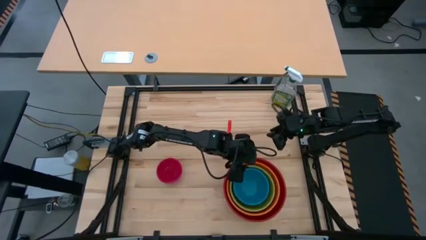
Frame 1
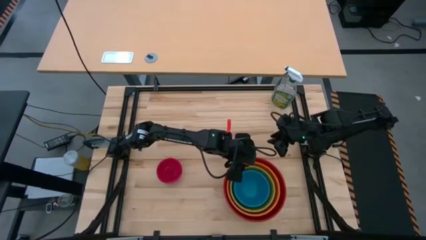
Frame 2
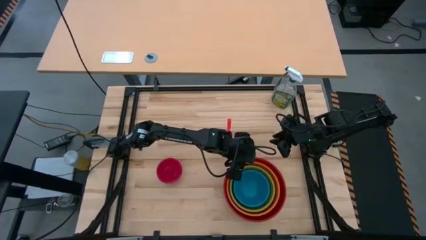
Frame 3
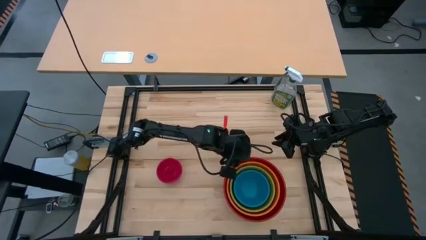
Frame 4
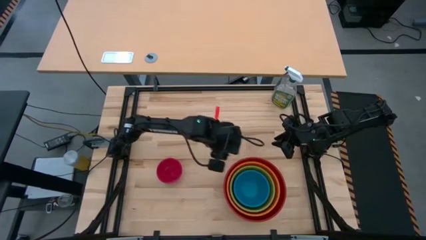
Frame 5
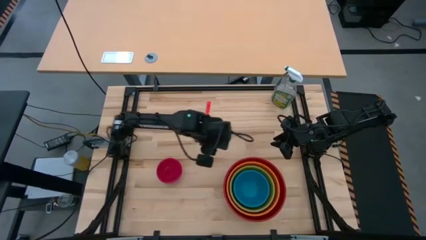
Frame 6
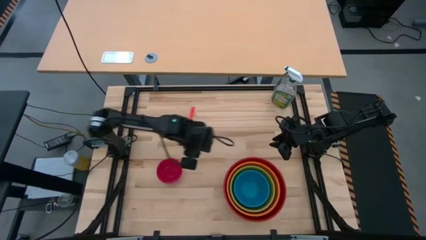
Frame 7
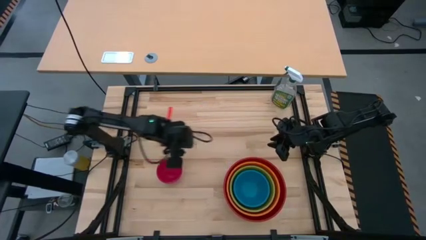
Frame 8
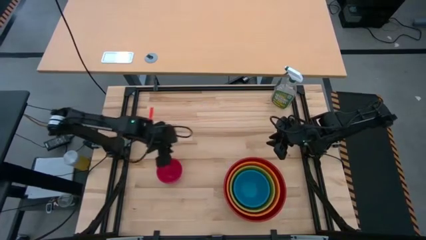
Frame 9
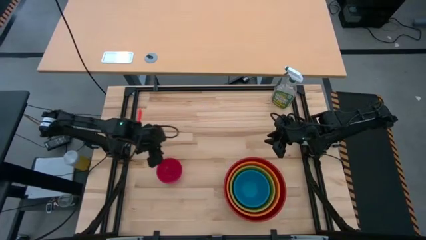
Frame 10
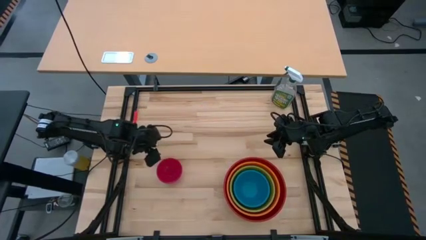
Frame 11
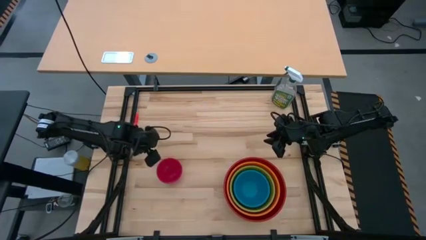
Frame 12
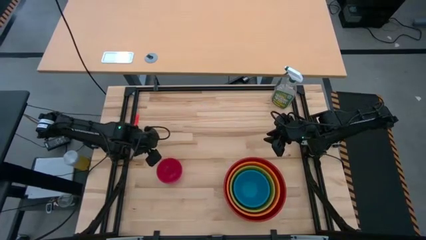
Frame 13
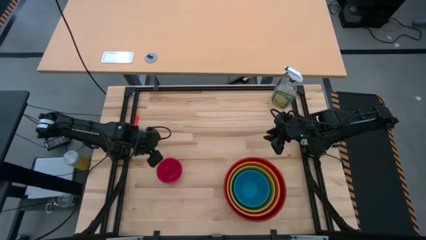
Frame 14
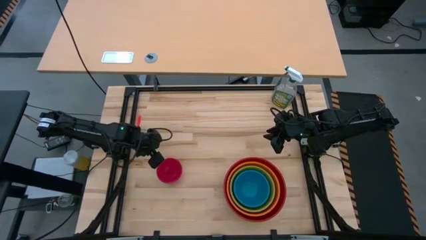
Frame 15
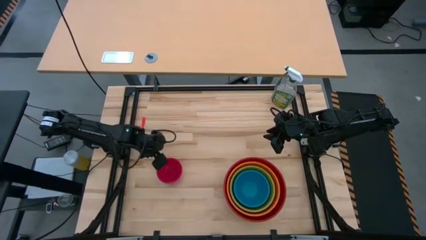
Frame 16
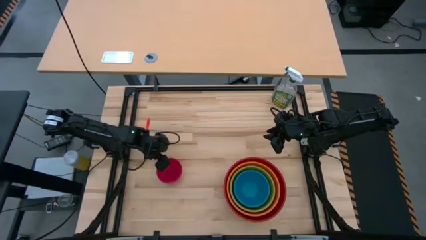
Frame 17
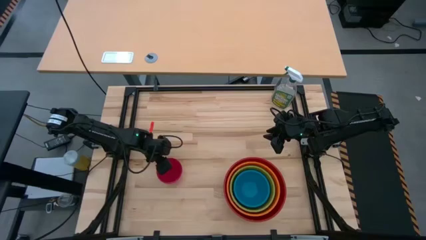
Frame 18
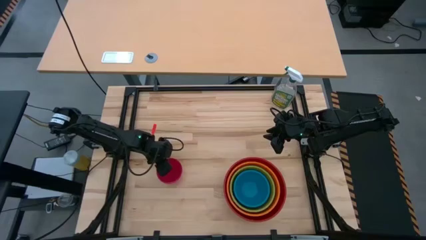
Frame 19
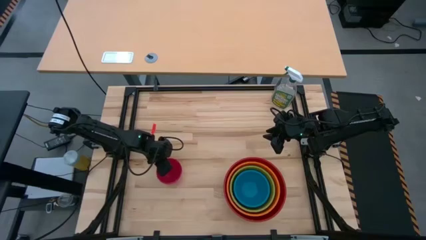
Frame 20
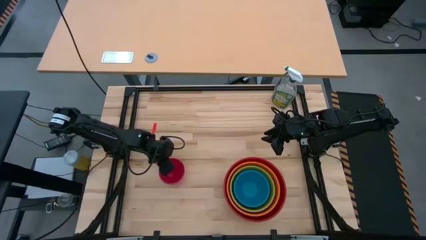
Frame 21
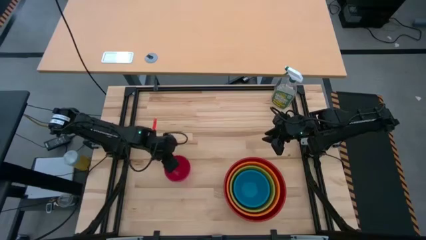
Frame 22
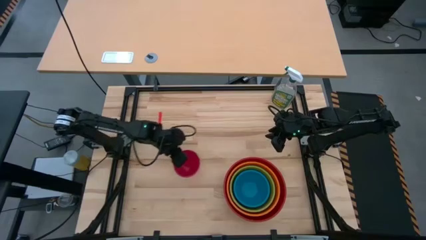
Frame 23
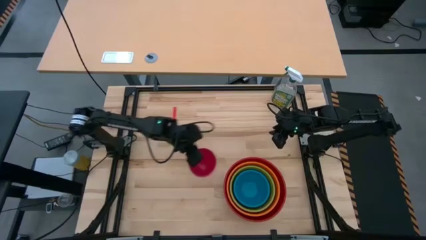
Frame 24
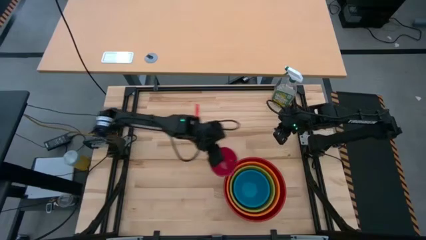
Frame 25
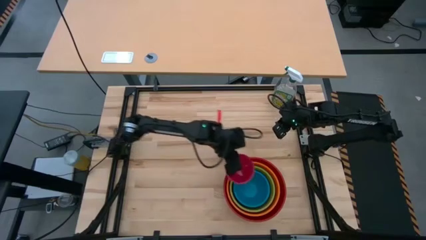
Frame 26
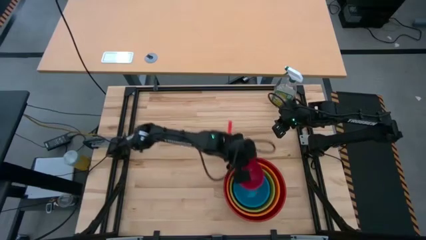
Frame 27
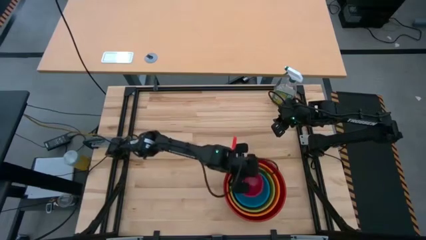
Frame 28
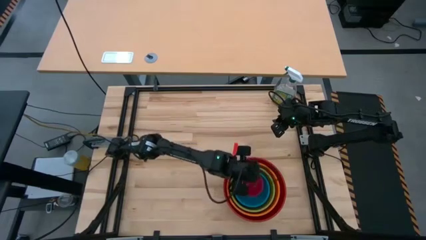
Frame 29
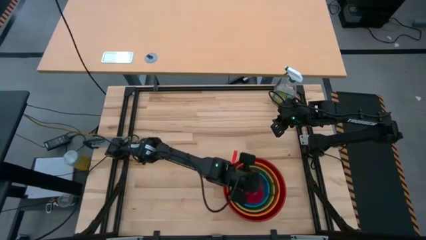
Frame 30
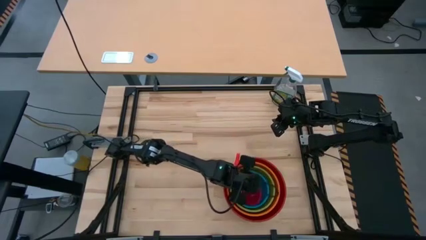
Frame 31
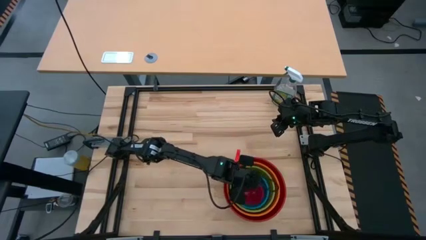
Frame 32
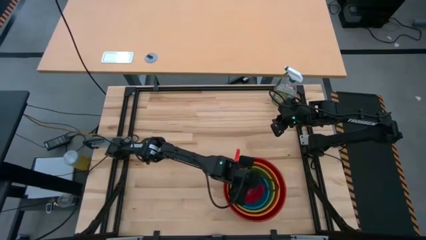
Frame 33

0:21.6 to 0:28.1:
Stack the red bowl on the blue bowl

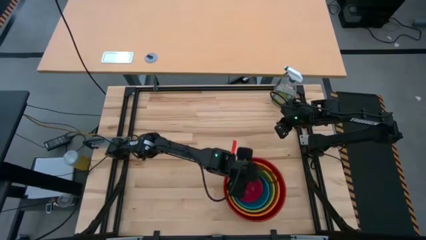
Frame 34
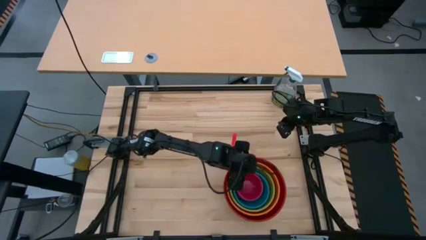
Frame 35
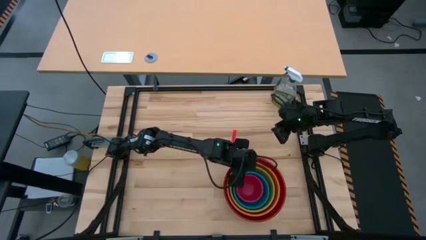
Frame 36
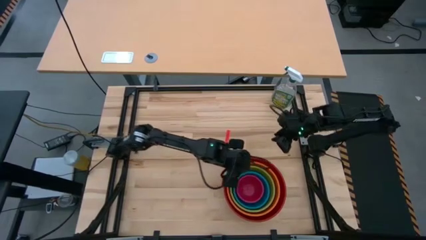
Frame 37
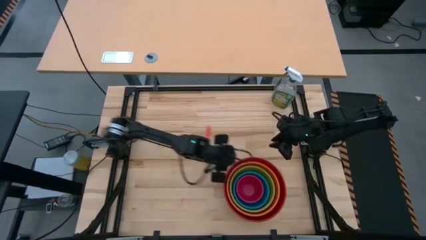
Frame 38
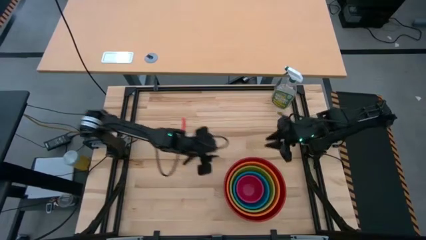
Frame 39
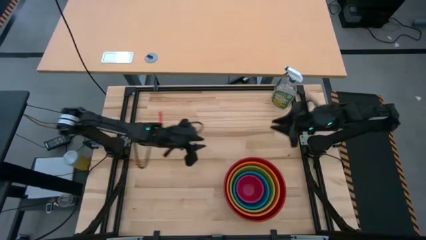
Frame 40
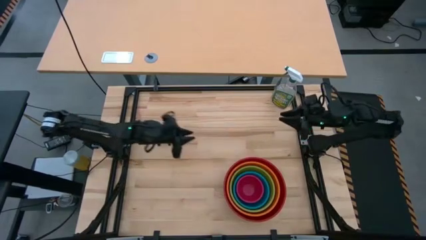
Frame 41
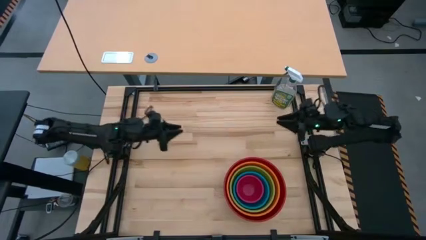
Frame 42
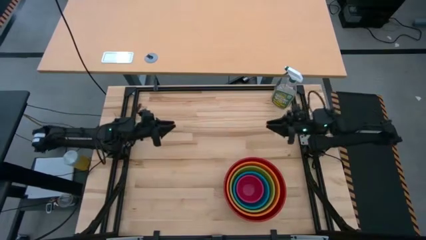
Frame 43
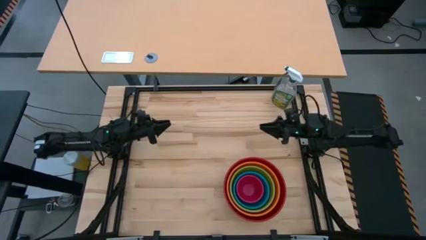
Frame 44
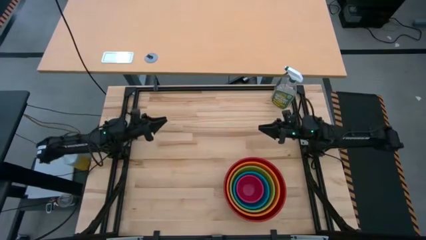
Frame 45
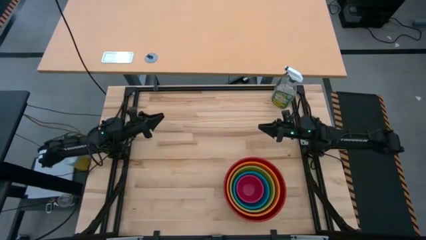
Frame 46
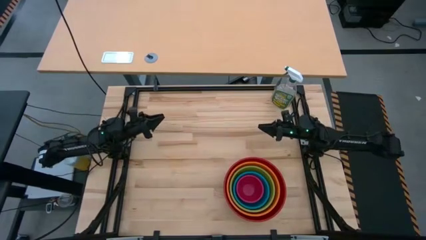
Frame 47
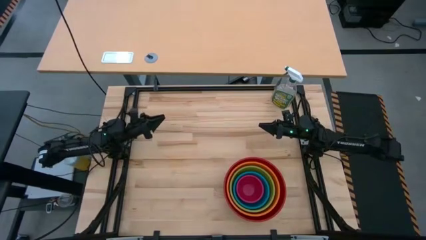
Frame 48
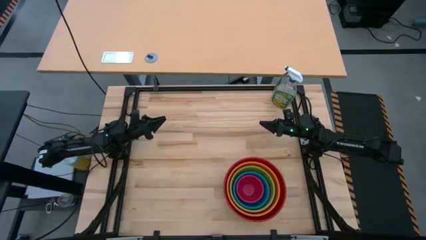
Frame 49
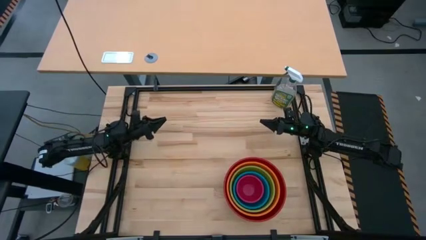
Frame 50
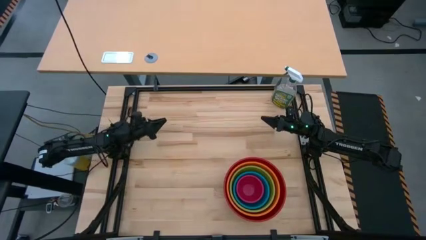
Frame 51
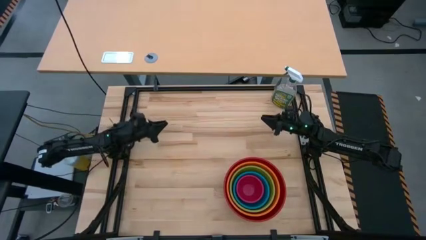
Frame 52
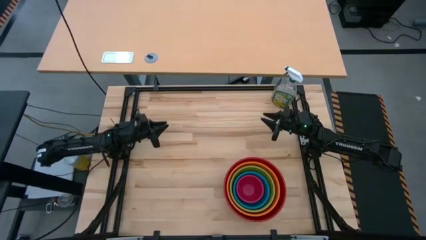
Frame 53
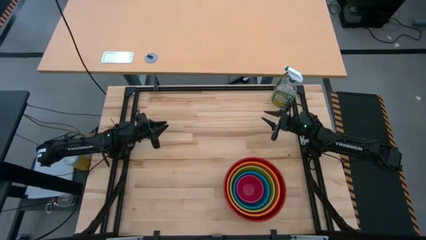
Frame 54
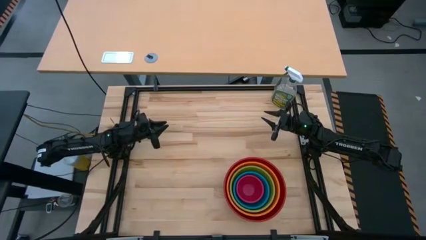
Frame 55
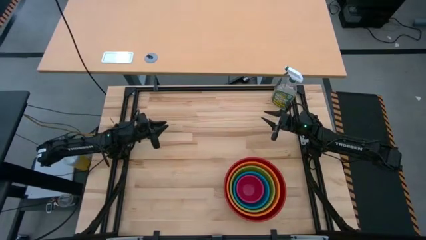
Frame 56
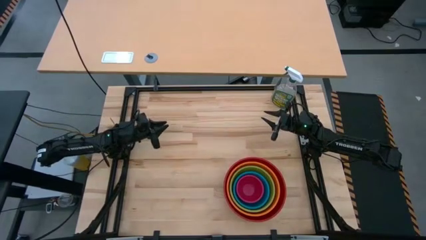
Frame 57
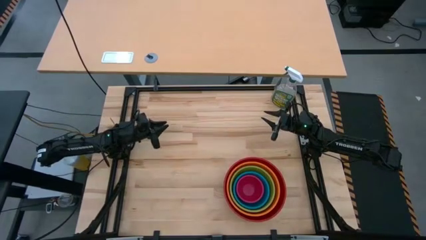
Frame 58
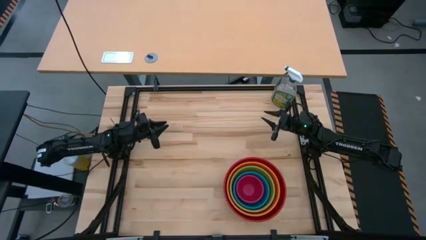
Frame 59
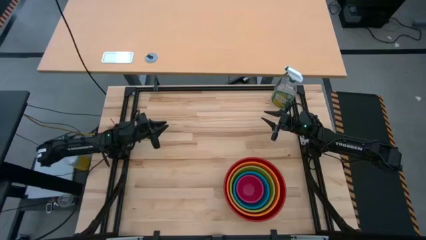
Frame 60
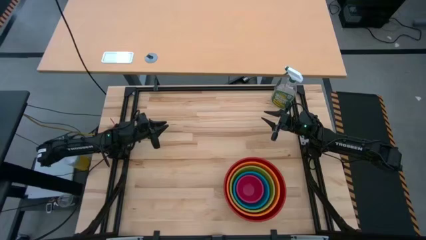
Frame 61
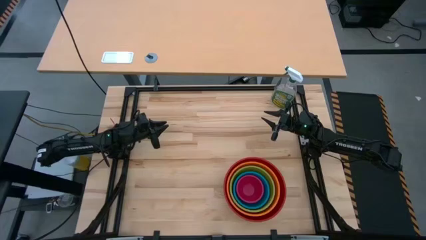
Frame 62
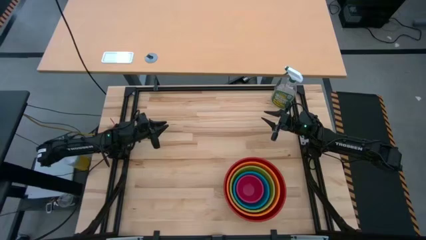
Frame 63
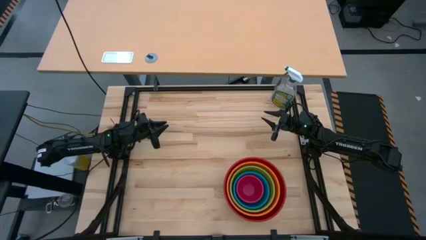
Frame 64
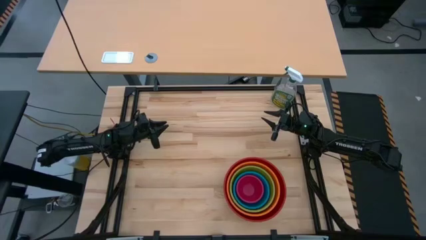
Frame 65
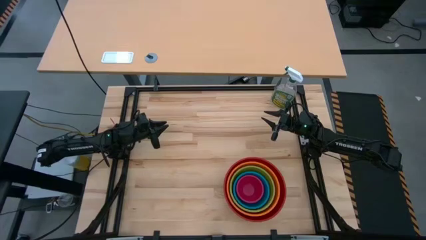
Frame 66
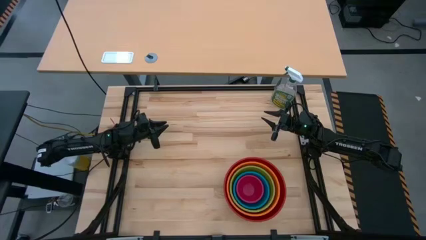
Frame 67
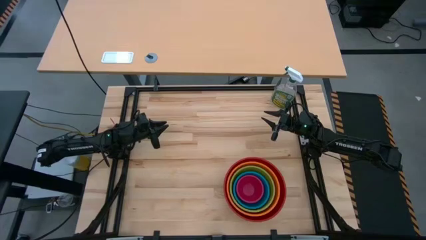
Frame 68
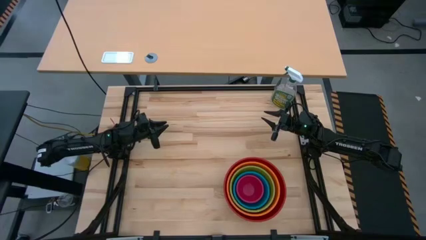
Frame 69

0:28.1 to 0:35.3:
Return to Home Position

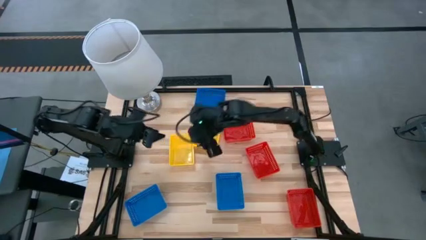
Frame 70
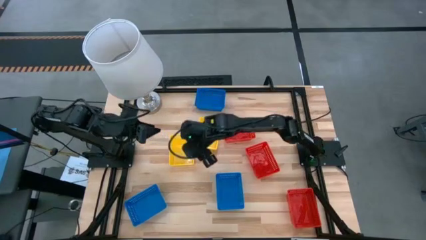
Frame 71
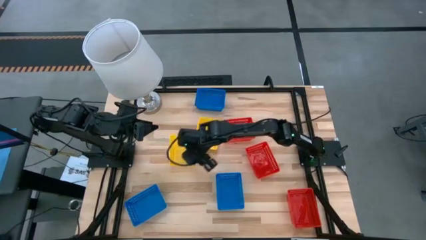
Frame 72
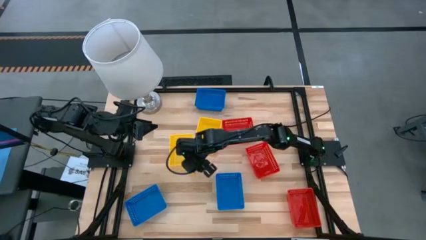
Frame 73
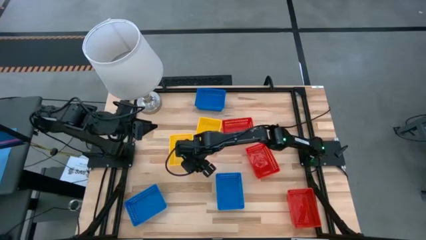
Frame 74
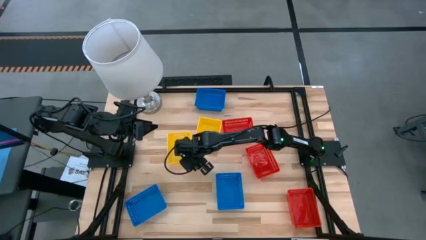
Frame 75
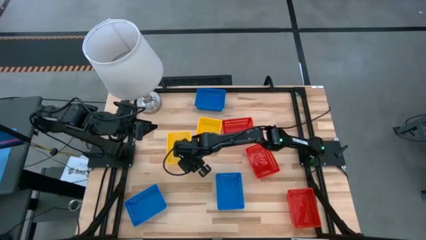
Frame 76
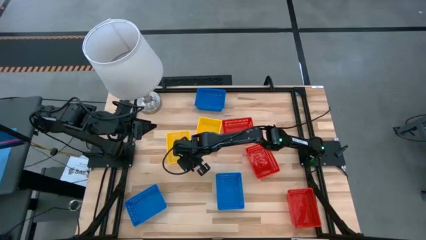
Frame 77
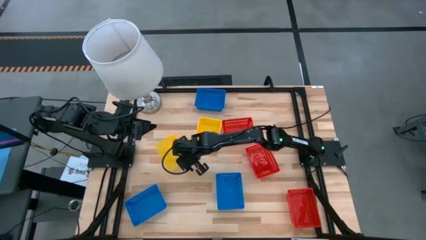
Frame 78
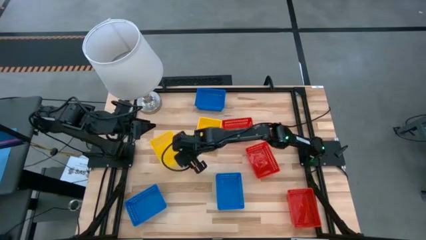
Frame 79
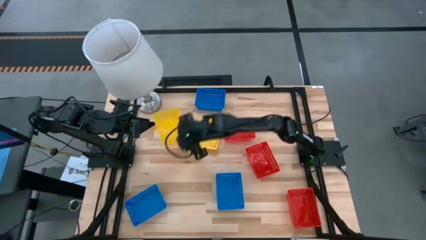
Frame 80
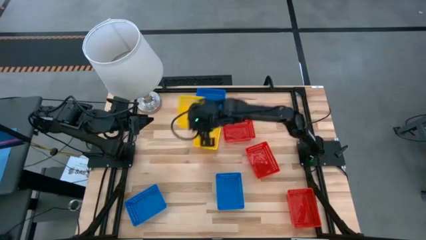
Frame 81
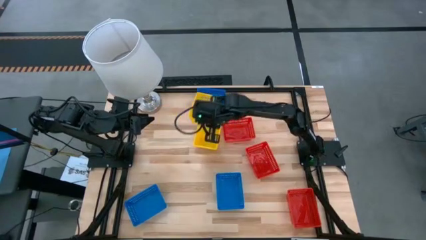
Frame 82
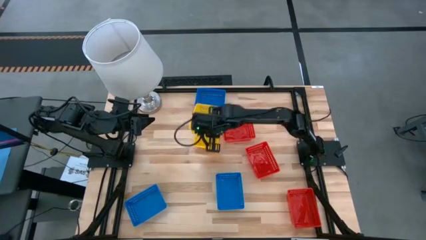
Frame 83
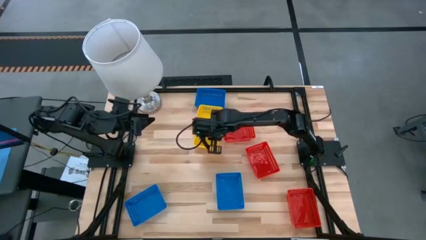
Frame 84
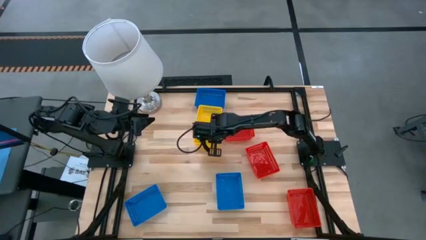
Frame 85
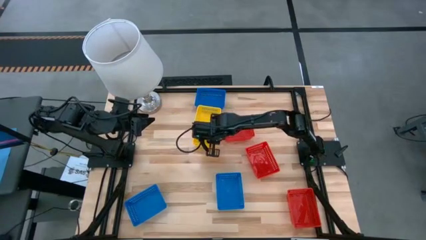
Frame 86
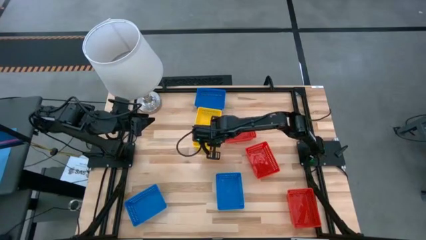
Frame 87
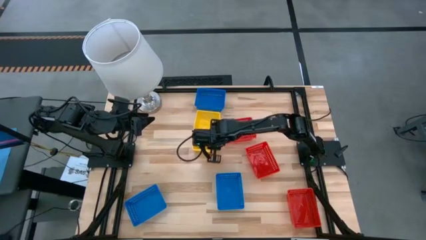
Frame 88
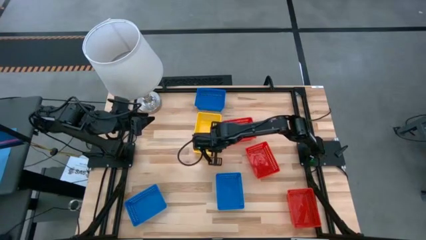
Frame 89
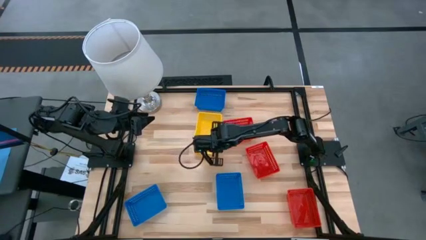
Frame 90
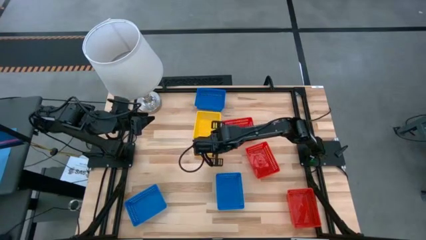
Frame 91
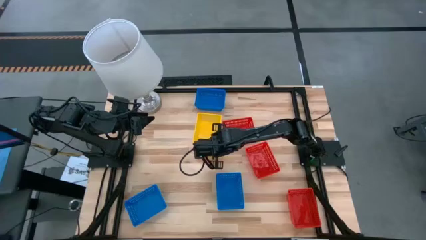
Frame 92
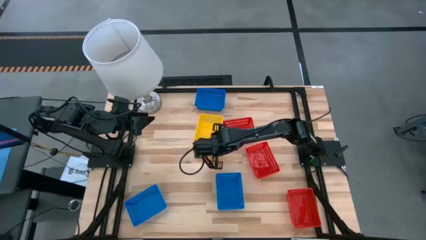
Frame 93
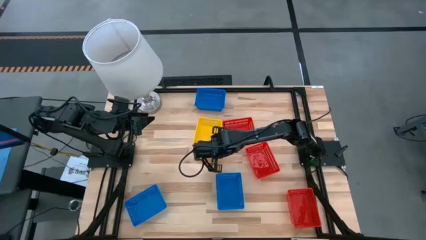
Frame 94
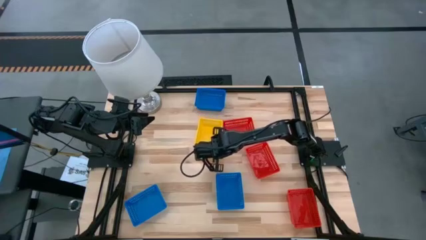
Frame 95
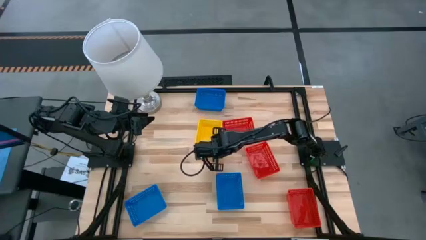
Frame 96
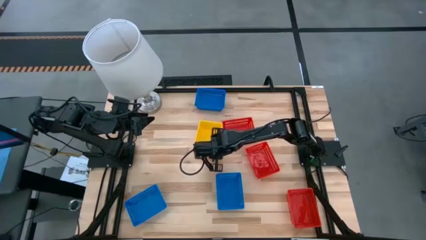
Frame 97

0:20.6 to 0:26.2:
Stack the left yellow basket on the right yellow basket
